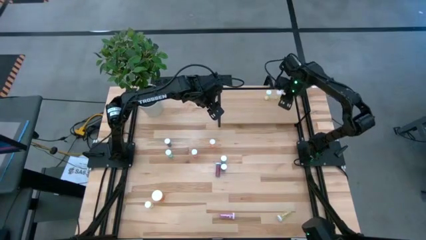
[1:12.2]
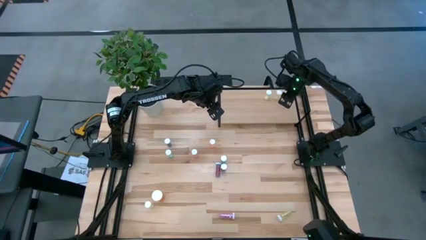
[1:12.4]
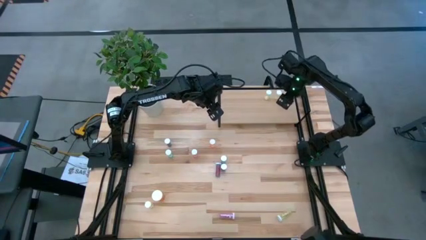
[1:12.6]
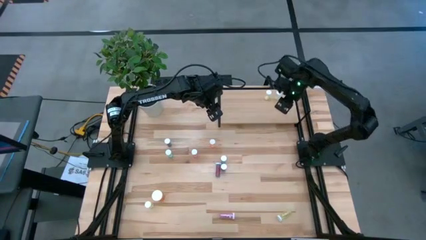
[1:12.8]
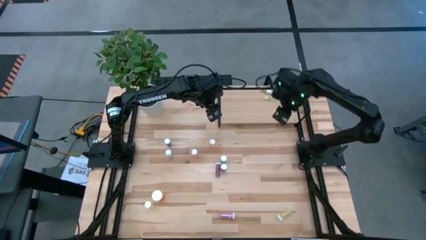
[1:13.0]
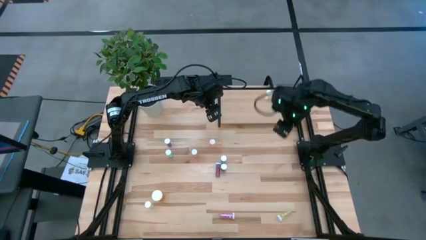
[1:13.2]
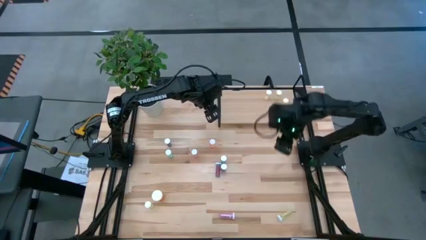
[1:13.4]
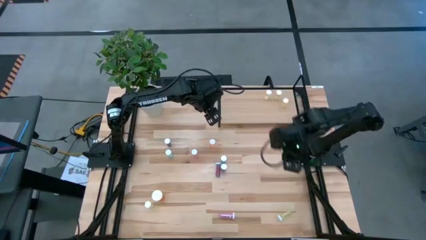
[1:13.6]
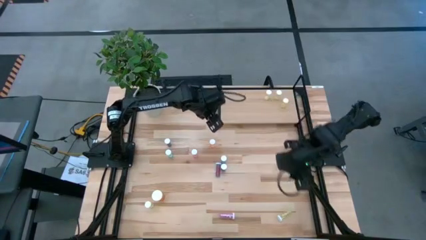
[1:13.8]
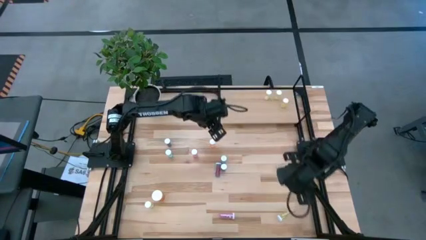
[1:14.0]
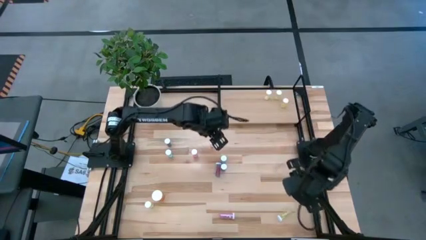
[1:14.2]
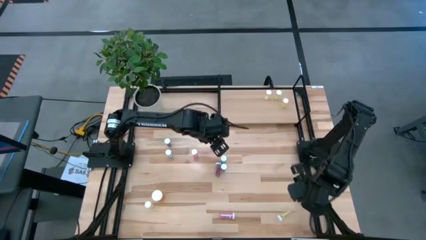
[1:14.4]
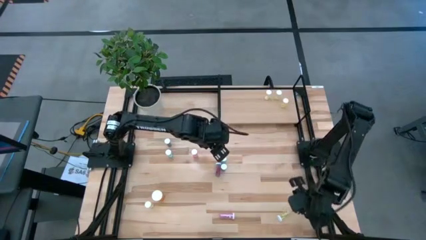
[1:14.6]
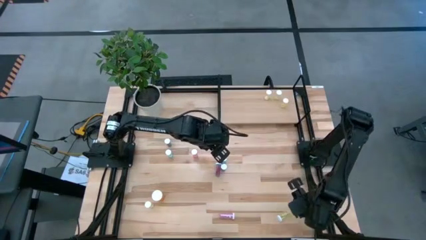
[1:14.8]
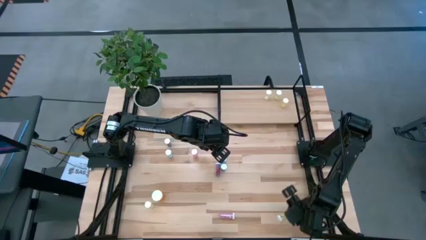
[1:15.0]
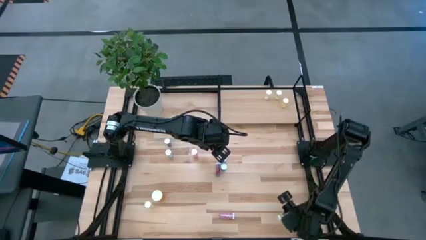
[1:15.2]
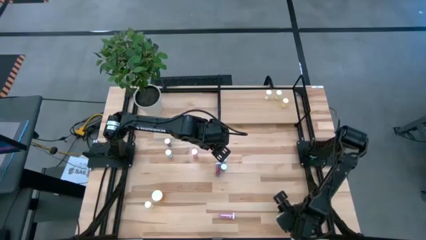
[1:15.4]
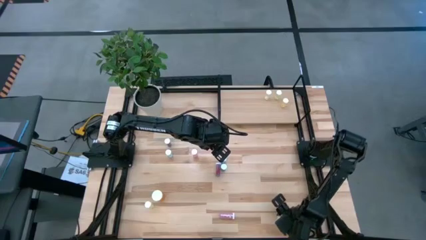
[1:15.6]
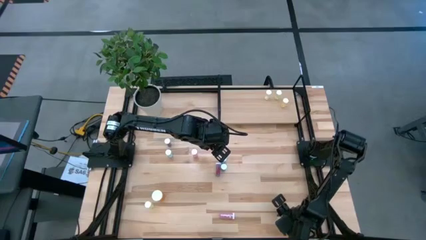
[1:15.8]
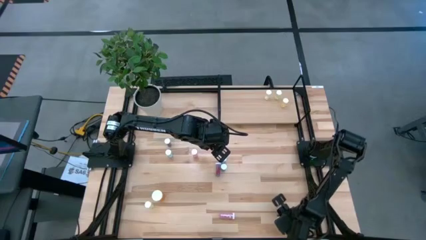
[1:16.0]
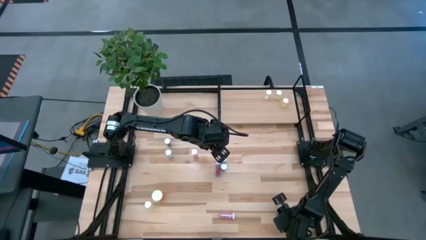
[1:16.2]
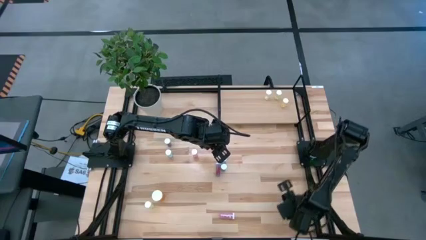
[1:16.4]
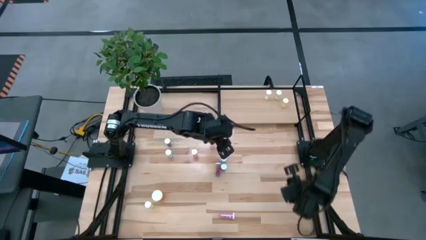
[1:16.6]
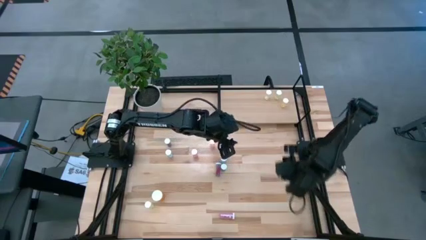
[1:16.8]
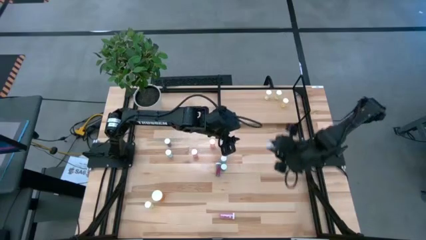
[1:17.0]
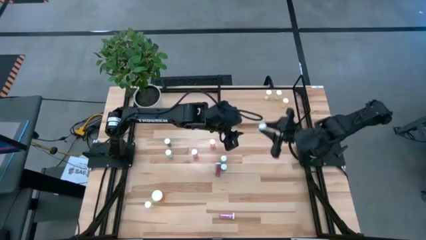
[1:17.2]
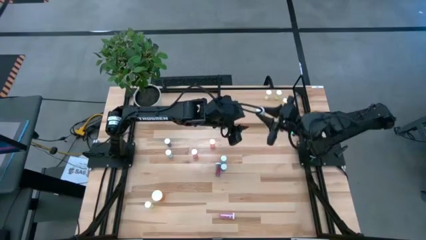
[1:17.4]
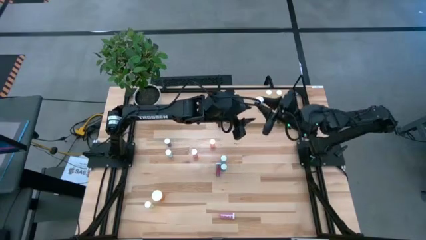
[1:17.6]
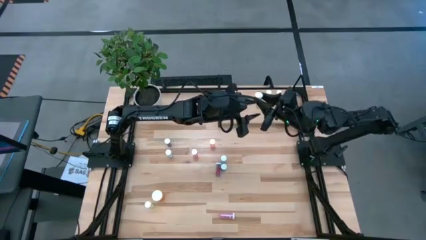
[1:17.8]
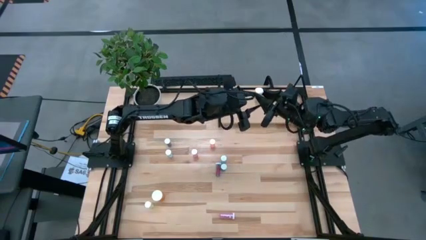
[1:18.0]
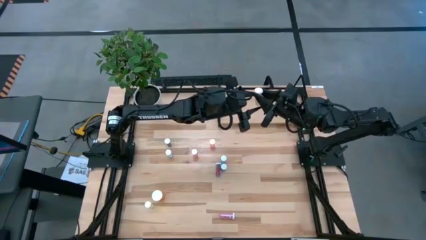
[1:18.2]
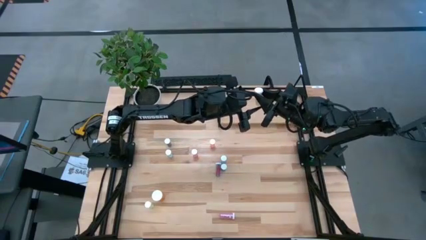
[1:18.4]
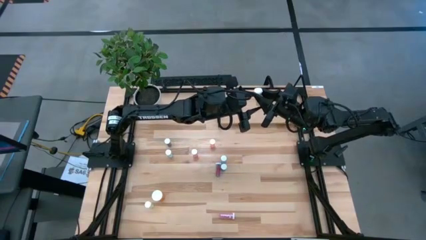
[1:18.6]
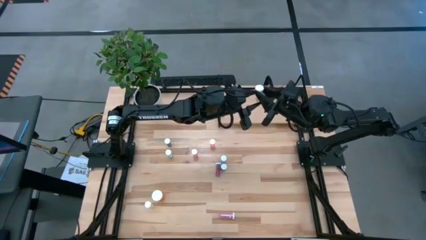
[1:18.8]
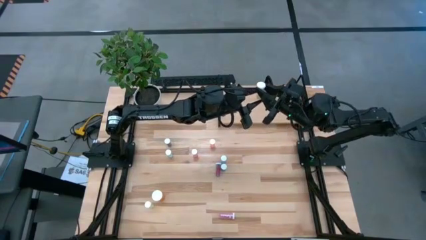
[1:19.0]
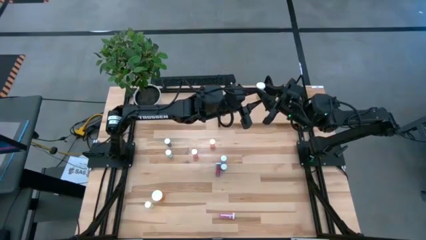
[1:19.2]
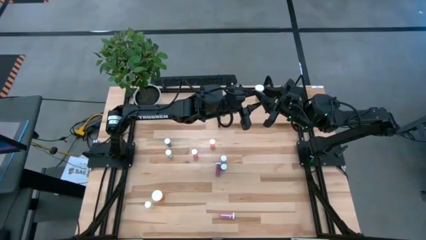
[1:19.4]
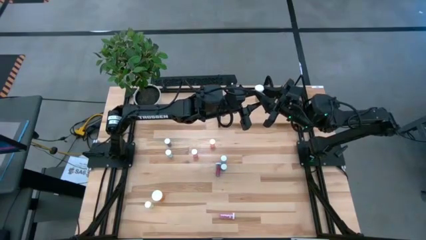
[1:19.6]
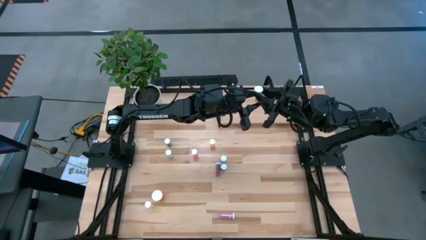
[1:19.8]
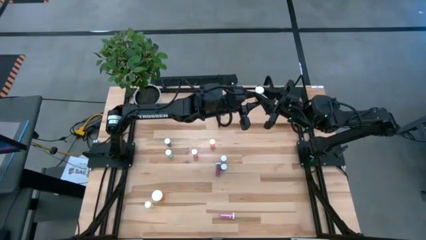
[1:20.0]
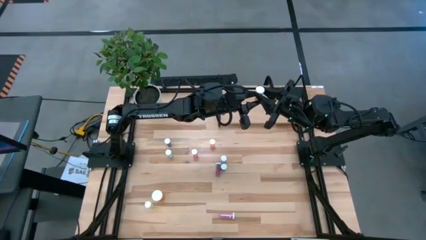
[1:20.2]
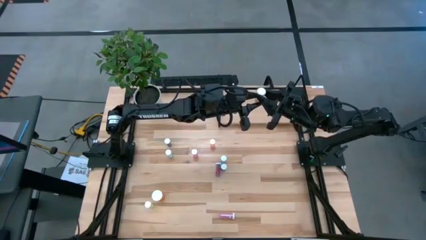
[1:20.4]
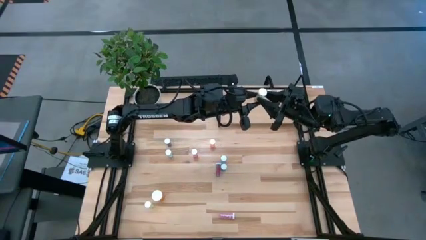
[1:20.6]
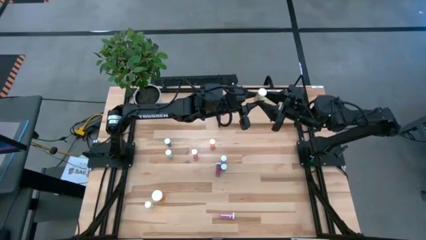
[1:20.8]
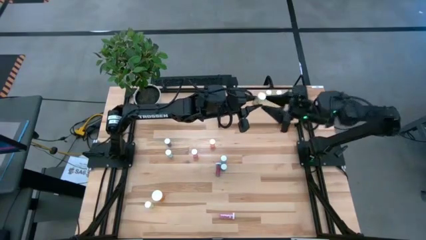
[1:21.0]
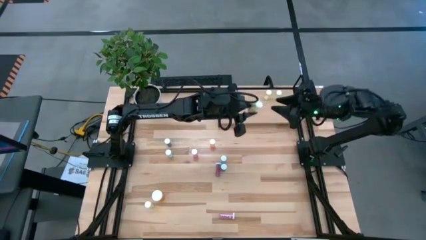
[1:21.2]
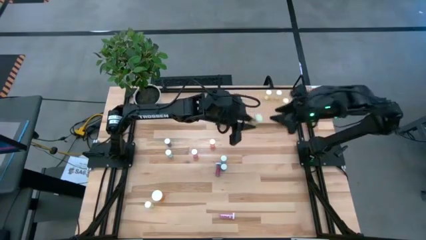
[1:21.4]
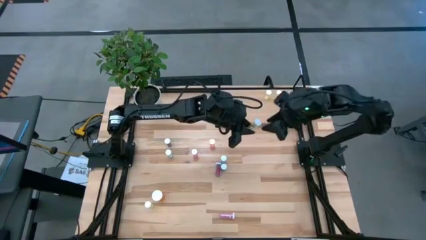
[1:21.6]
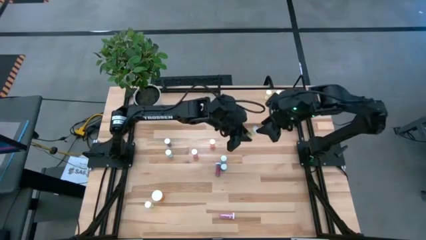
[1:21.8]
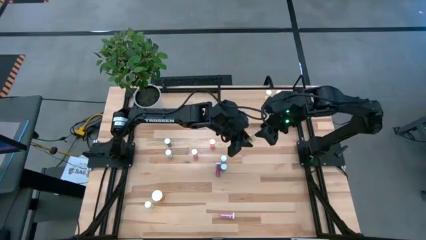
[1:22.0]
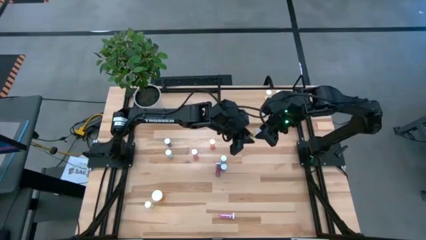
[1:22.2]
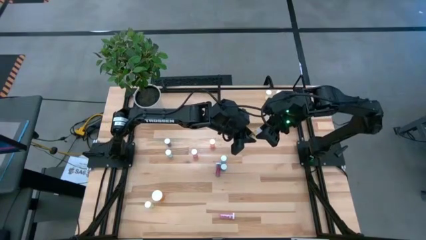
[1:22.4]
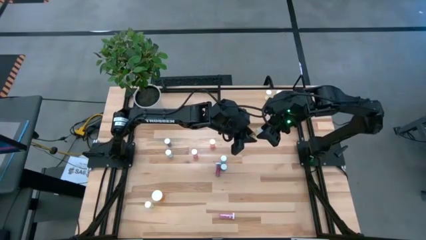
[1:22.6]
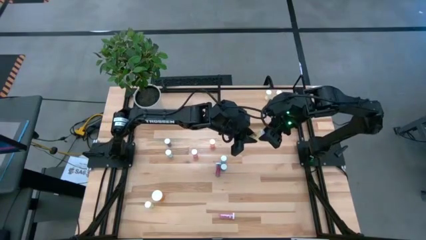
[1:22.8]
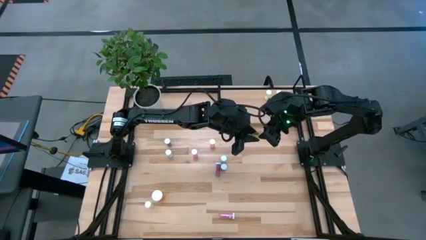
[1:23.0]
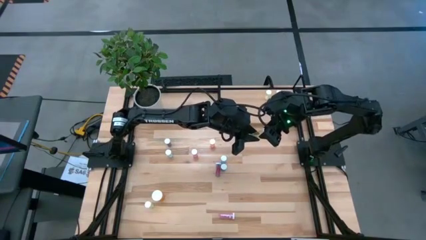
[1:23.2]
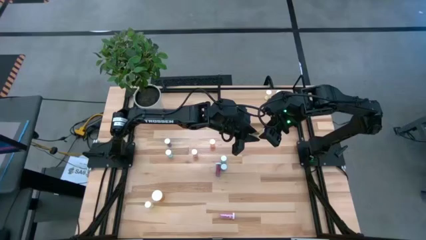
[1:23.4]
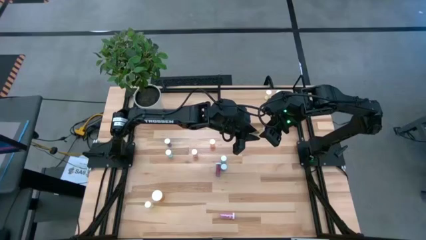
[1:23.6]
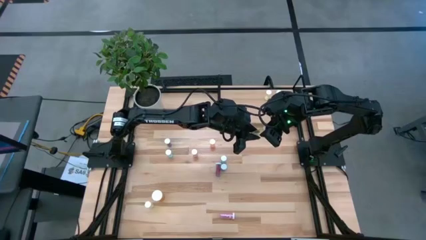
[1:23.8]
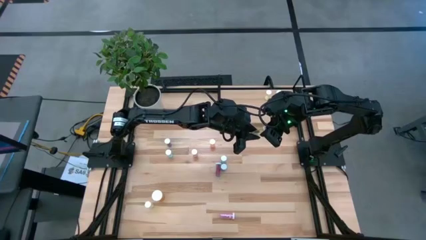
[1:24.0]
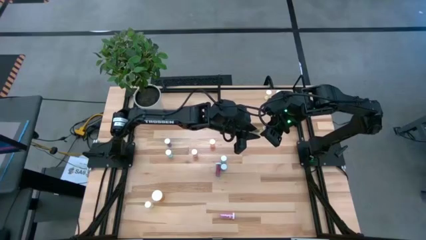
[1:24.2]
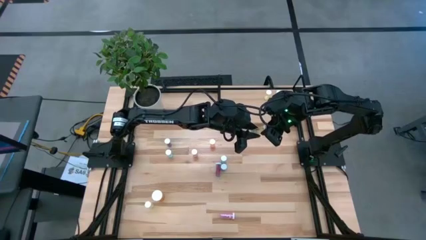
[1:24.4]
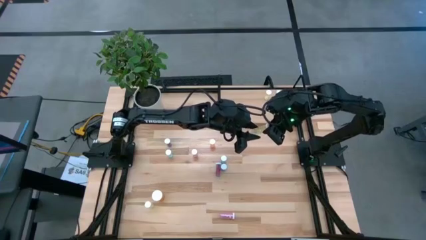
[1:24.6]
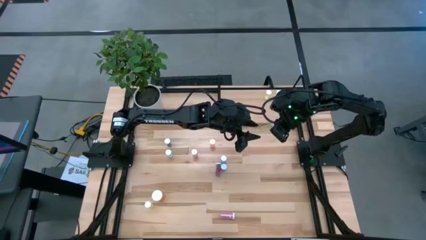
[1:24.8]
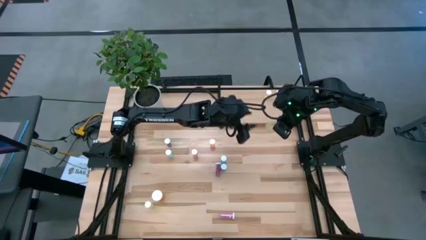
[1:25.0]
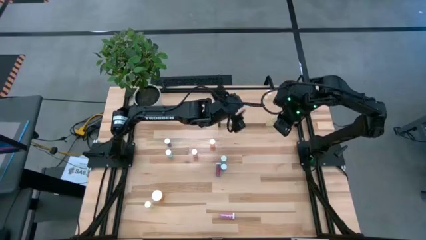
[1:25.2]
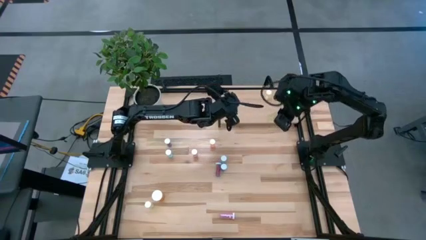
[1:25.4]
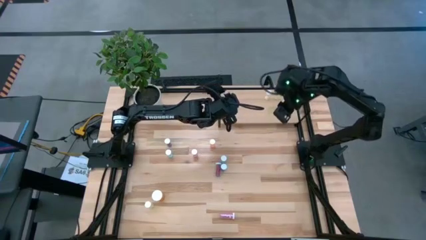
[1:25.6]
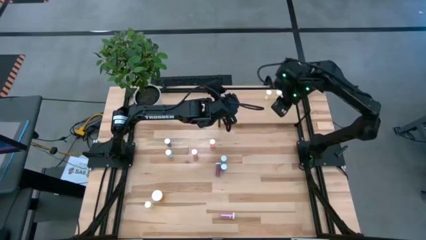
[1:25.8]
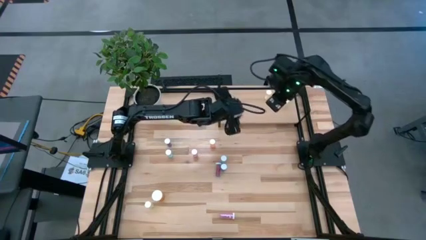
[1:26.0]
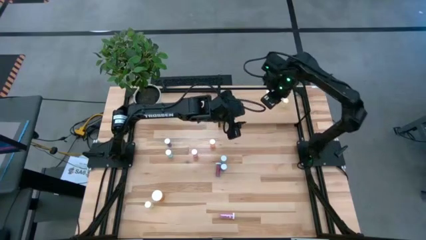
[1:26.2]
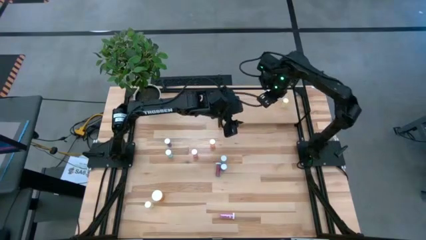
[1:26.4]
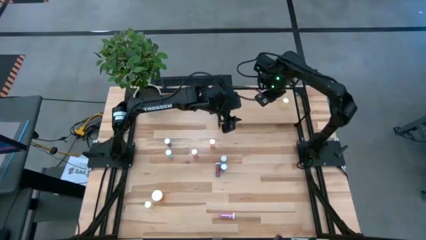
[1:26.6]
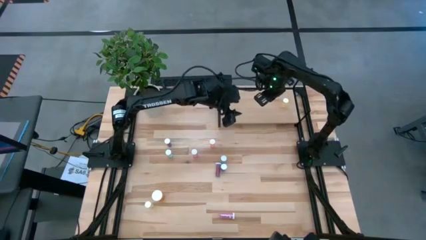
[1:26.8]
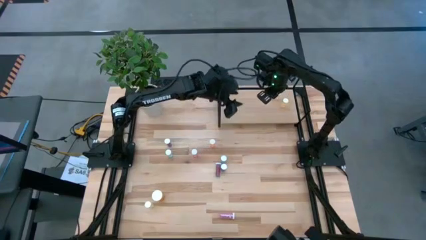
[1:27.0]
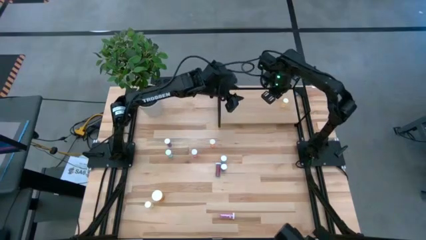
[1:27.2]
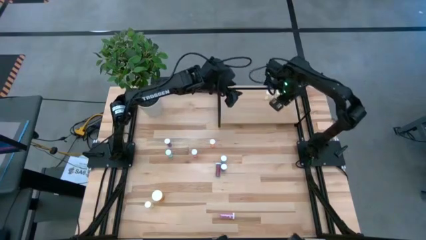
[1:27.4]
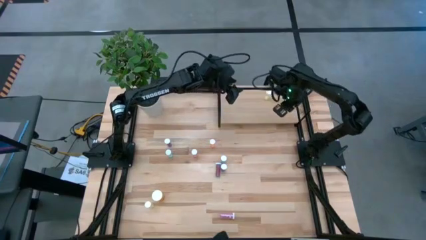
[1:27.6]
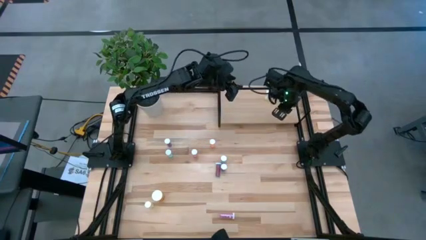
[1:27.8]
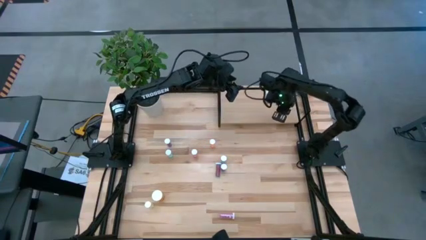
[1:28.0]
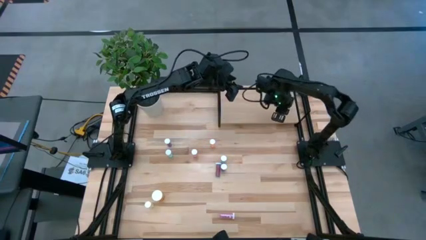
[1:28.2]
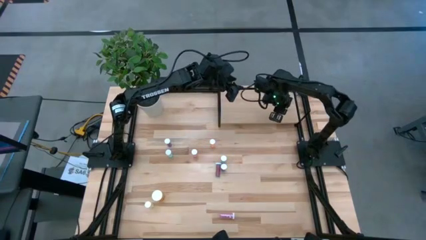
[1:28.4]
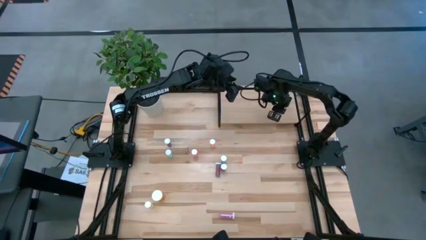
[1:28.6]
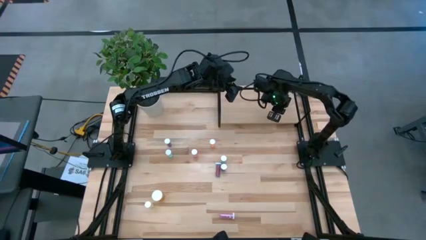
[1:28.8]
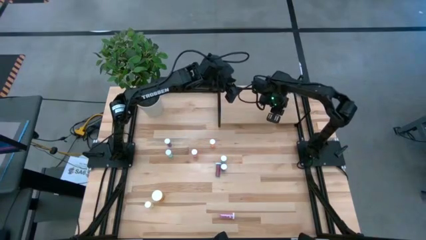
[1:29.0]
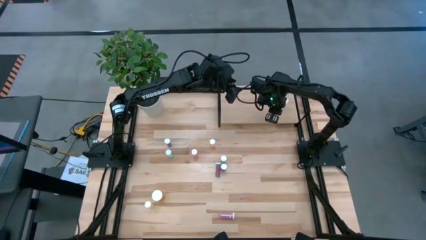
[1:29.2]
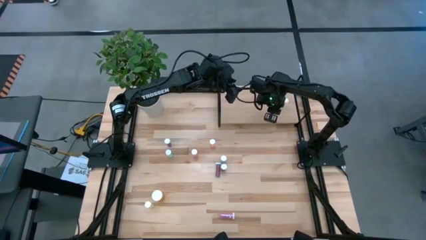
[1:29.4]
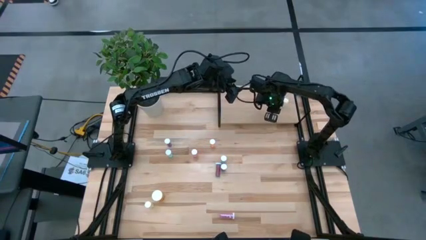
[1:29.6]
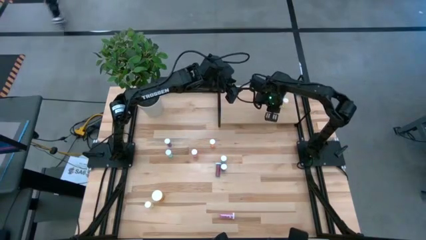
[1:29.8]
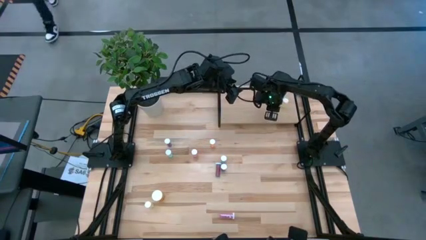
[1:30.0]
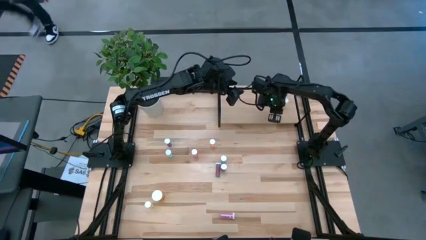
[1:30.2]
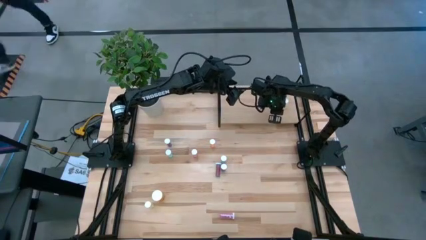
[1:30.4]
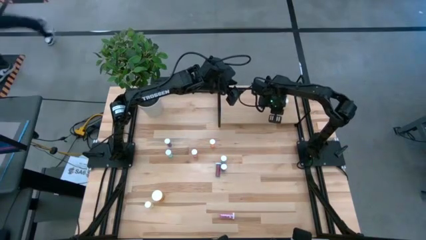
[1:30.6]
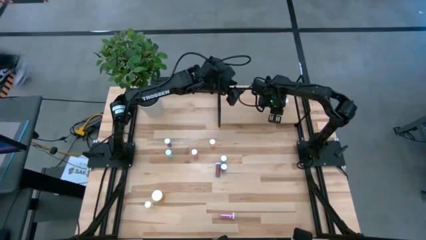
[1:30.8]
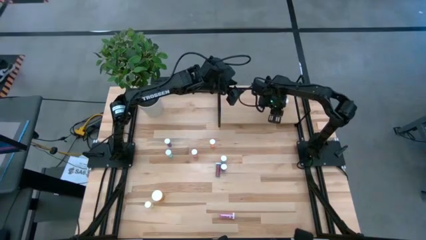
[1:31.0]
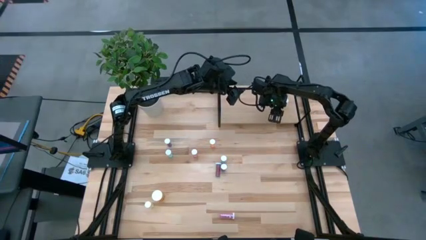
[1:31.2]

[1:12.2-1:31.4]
Task: Pick and place medicine bottles onto shelf by color
Put the yellow pill bottle on the shelf
